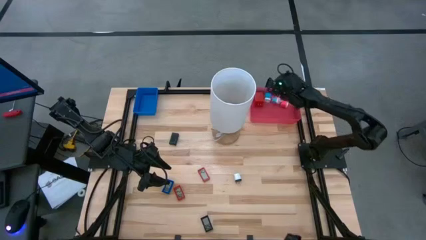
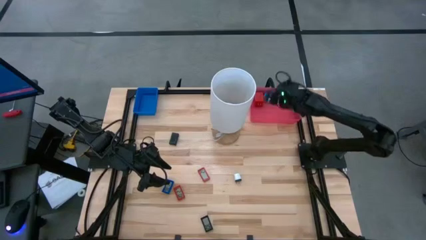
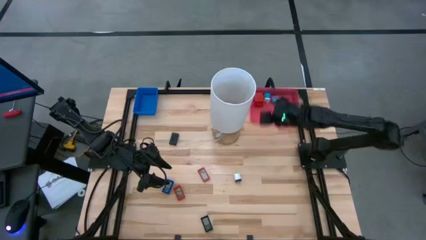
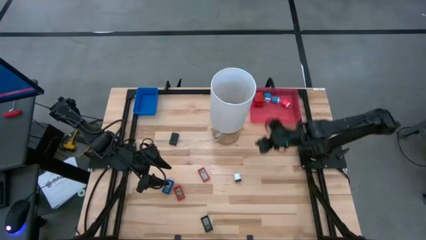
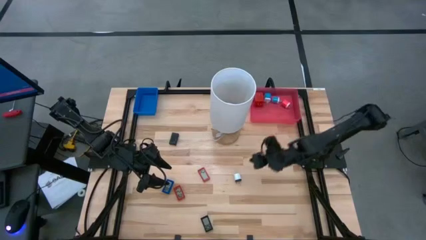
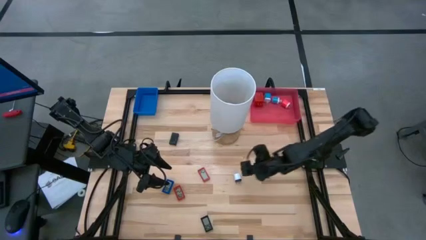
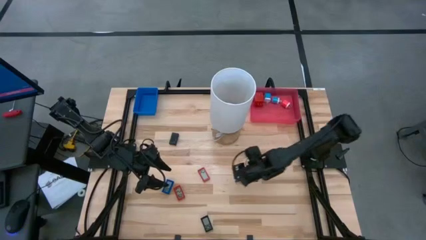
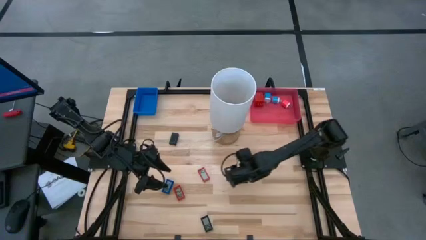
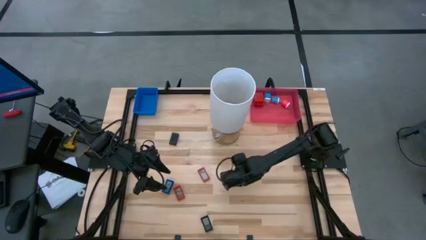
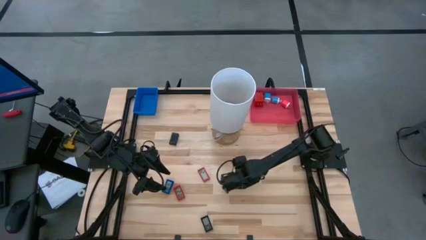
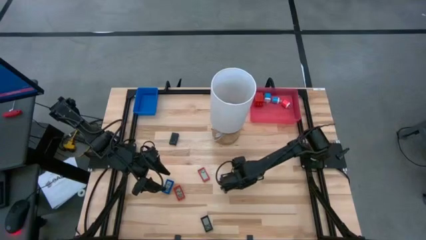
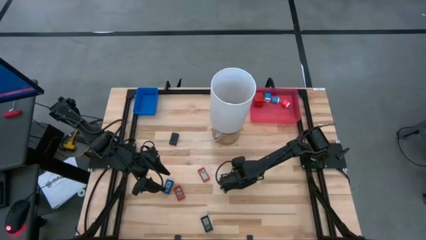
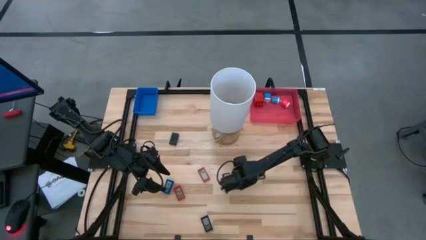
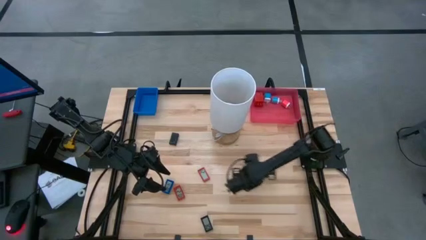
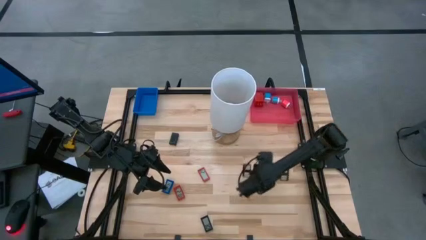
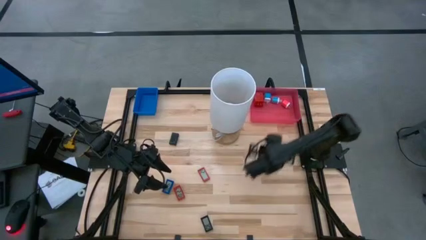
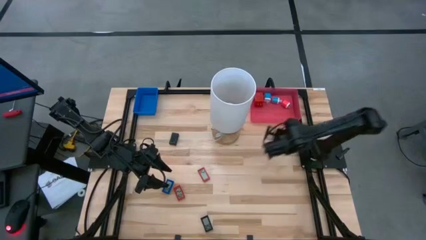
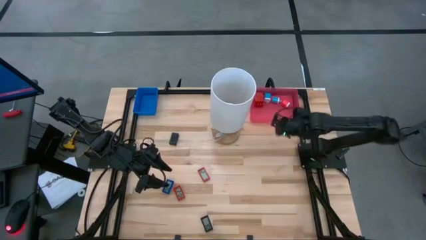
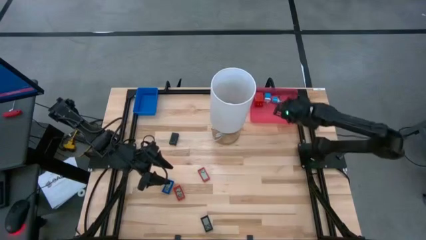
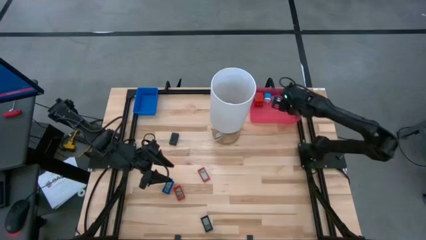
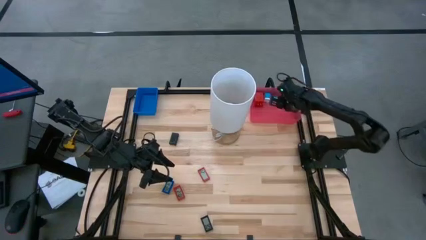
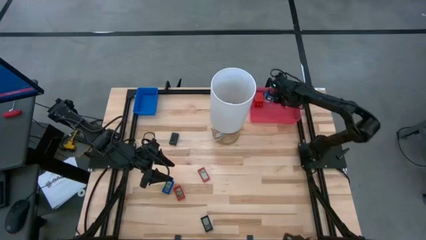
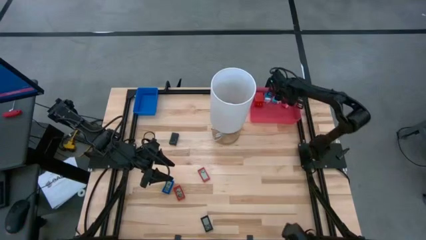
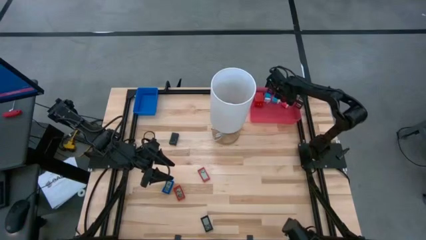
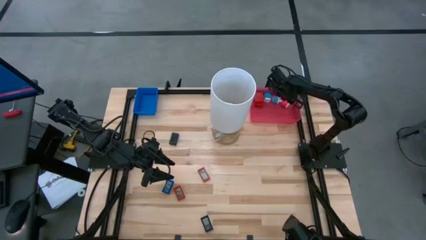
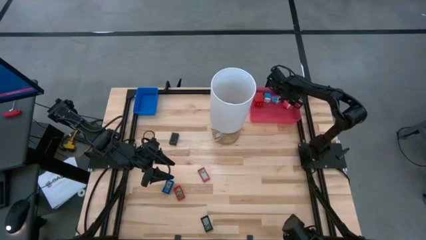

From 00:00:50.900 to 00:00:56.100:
Task: Pick & Place Office items
Put the white charger adapter into the pink bin

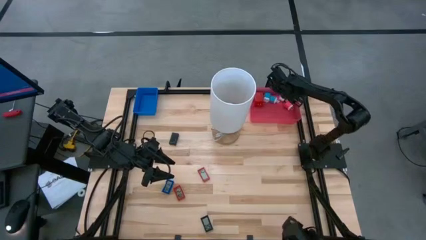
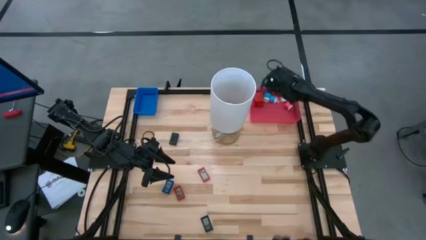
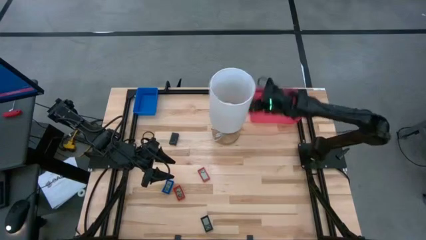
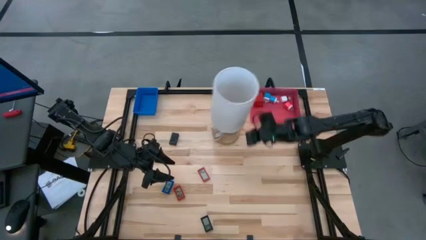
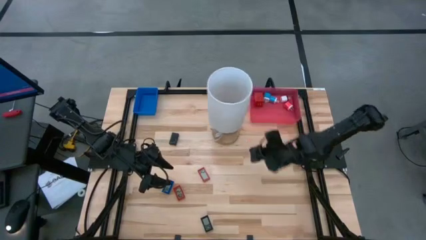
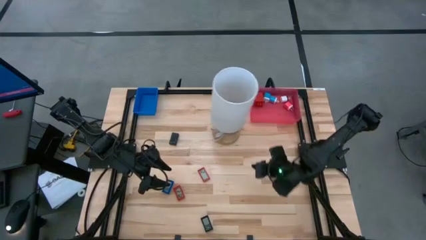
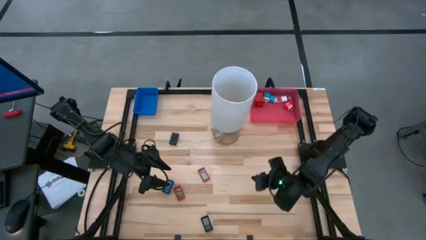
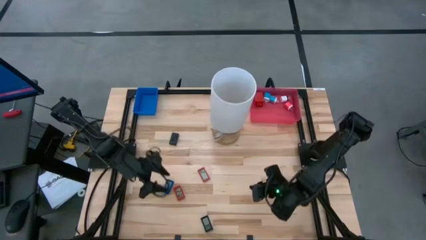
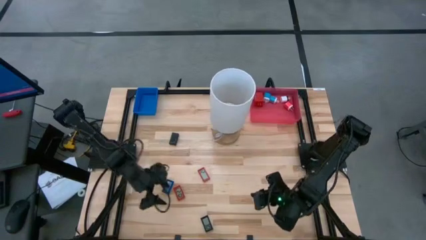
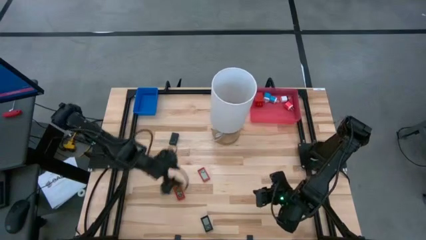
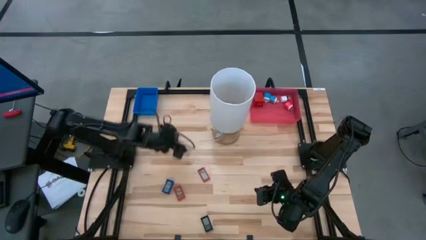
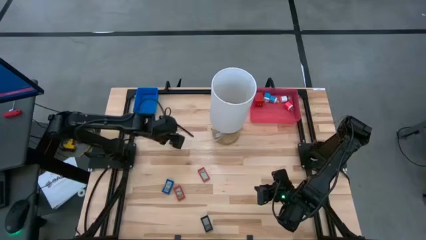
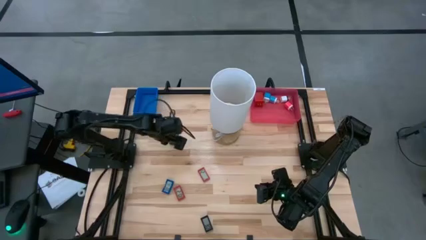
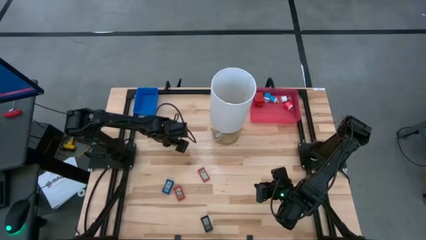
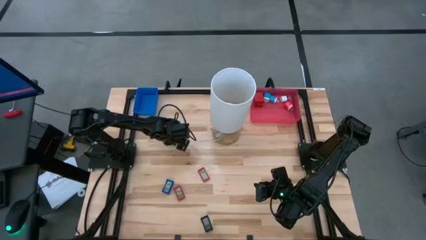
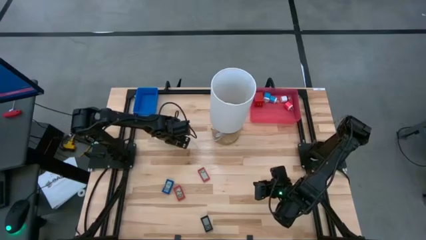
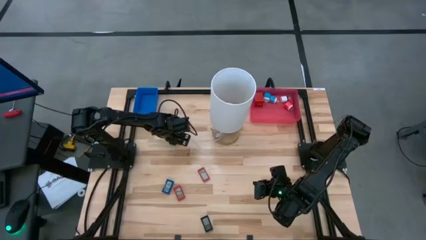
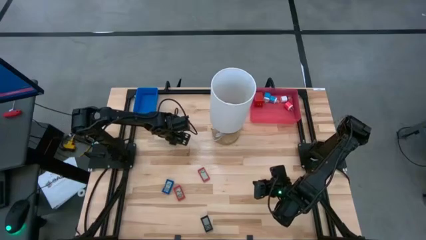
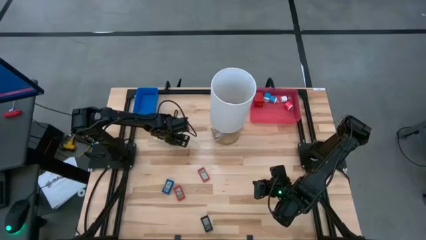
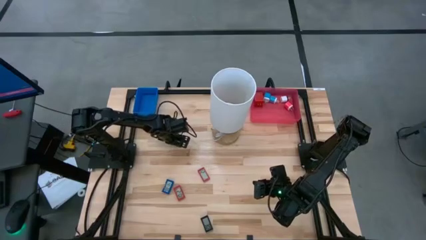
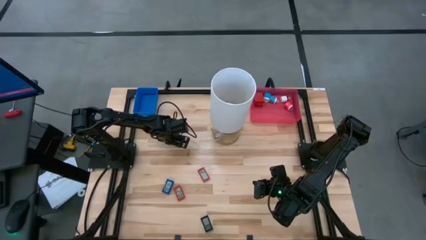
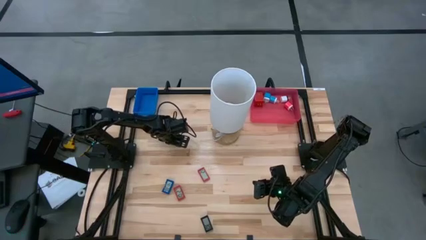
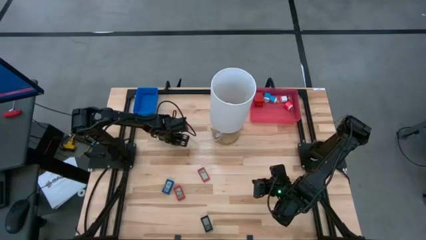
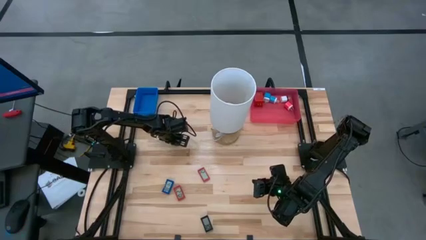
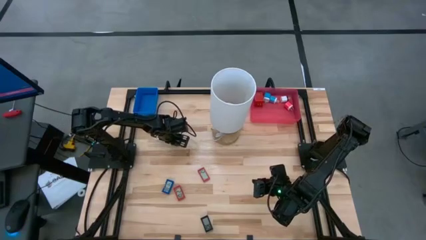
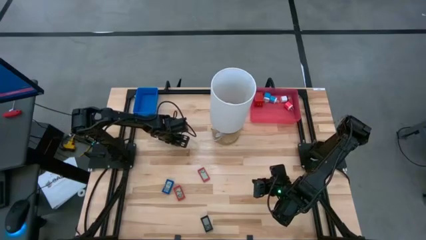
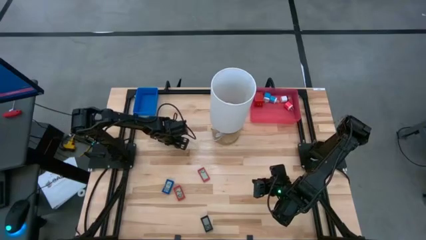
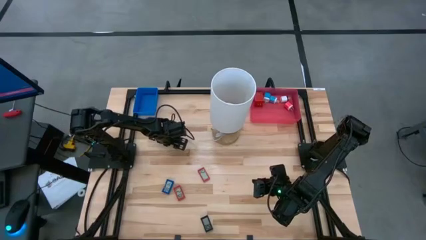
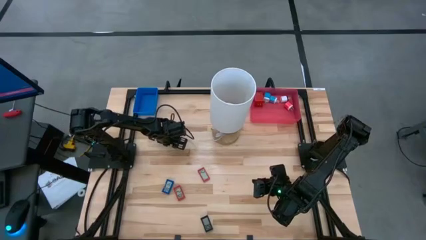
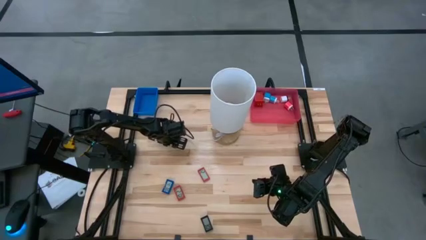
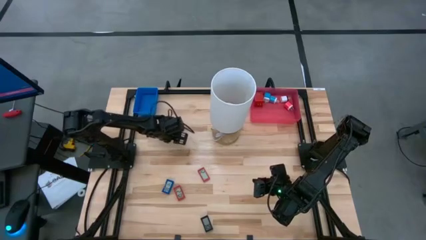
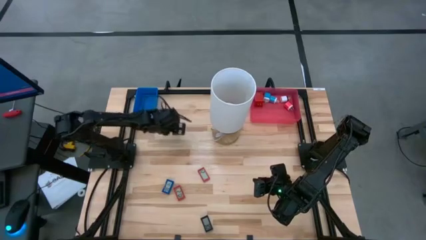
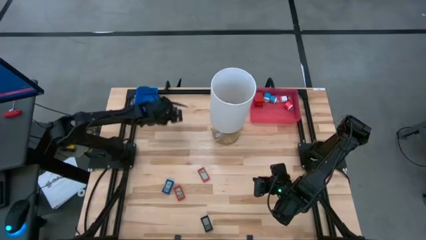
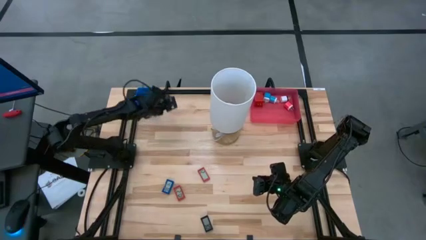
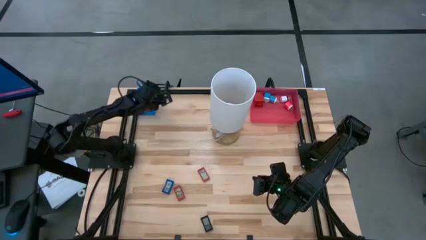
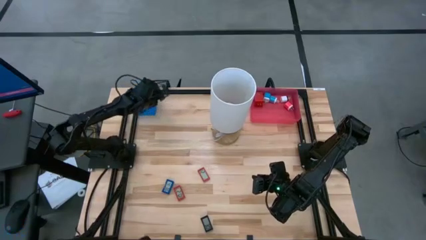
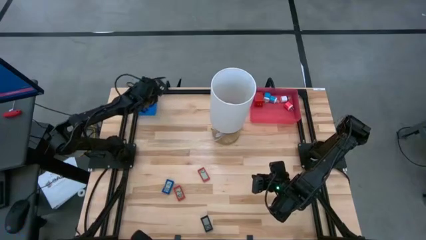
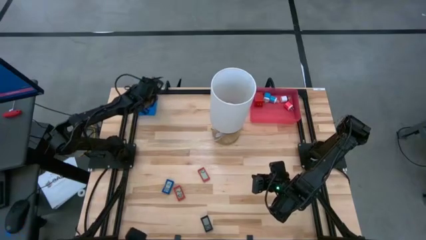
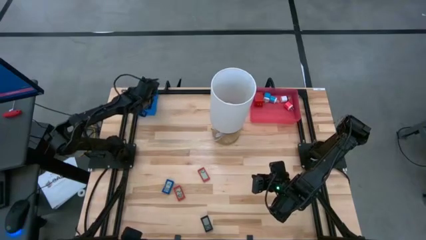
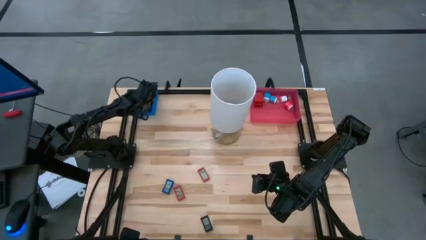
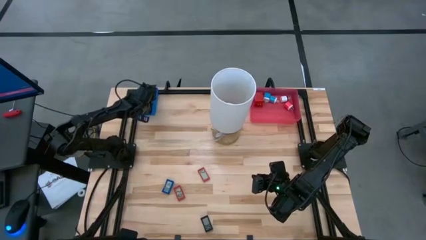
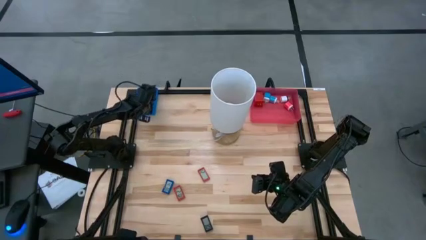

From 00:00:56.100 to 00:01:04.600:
Put the top black digital timer into the blue bin

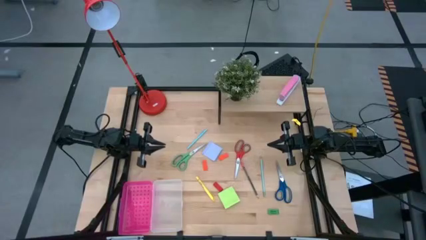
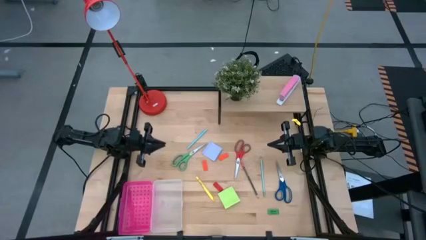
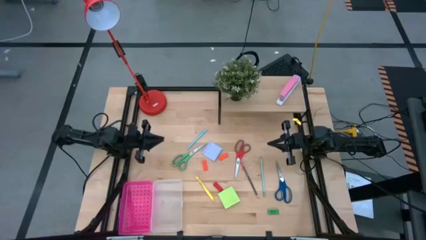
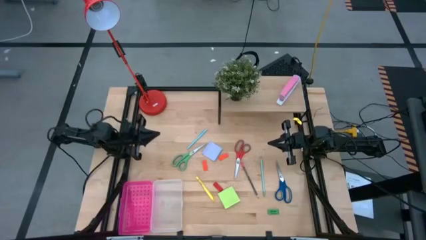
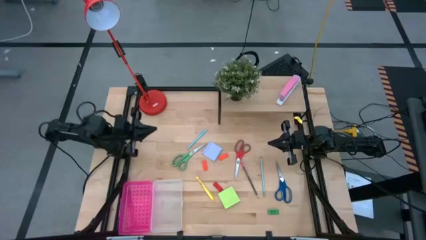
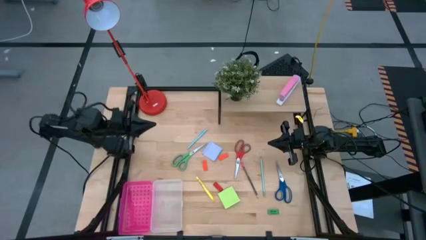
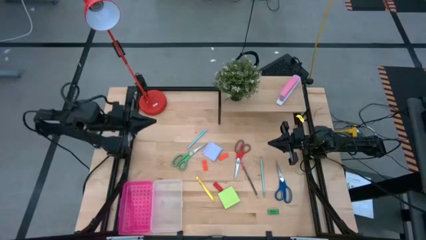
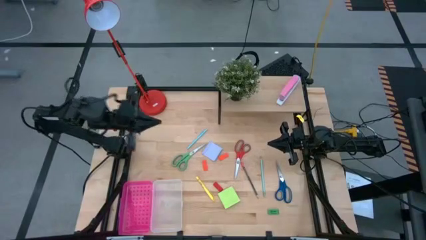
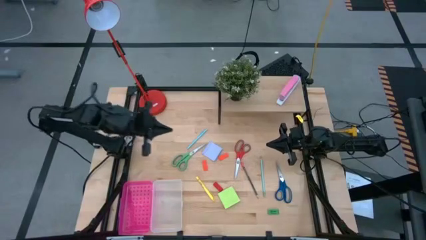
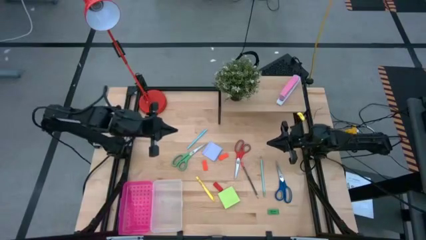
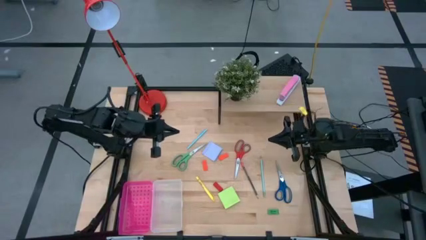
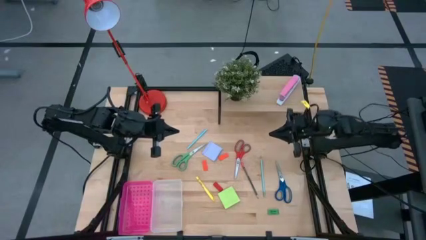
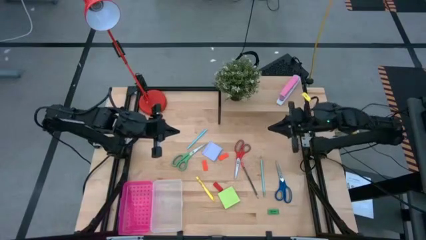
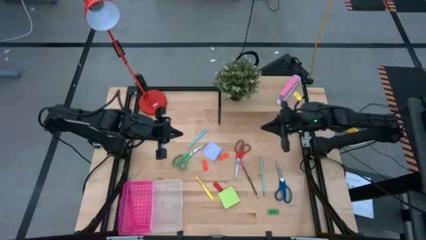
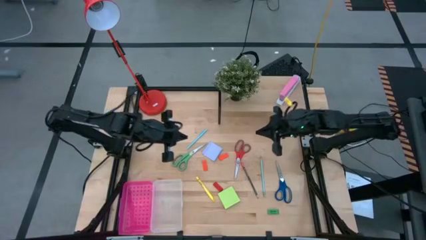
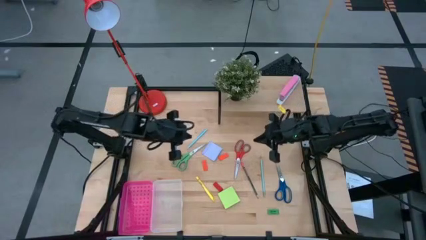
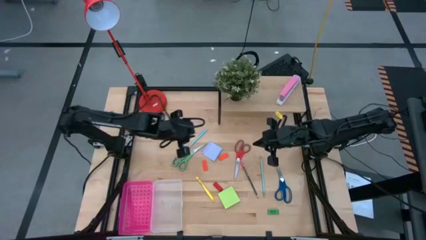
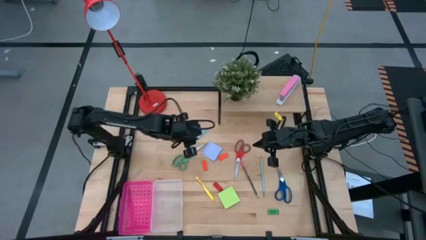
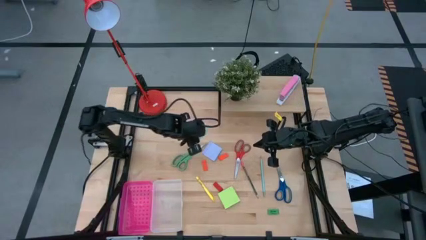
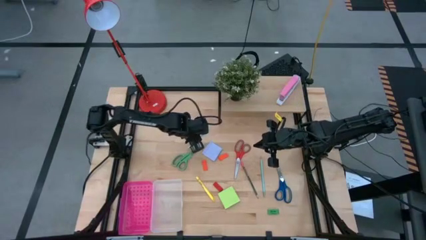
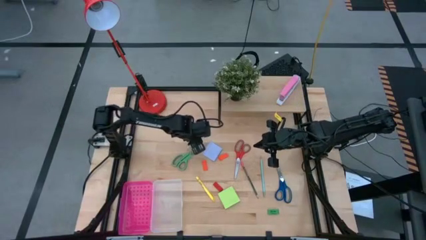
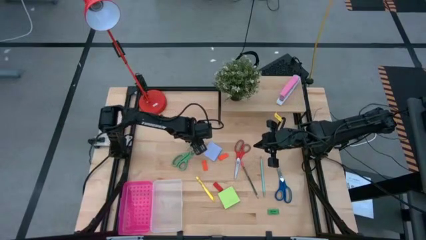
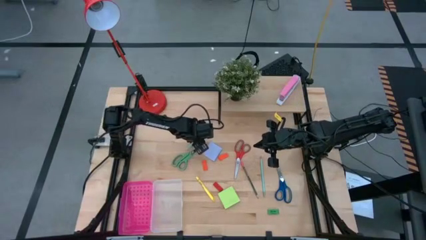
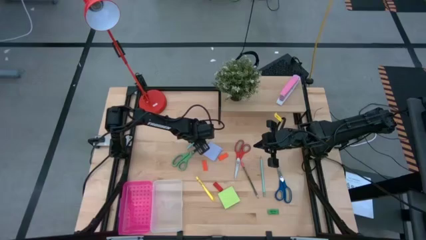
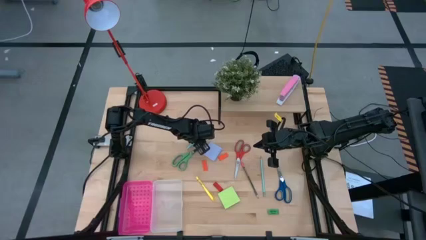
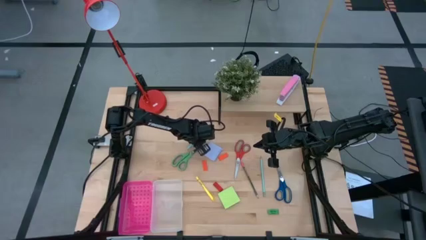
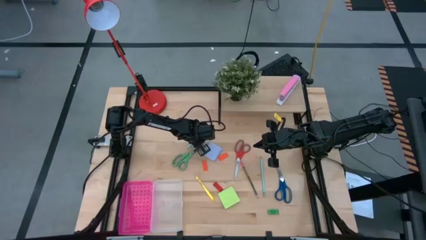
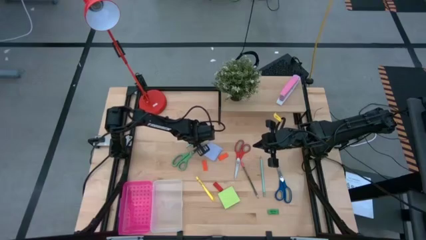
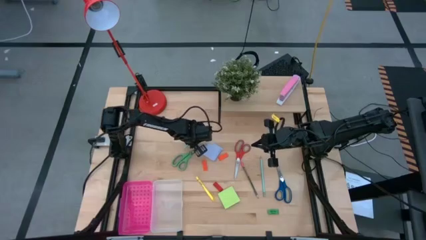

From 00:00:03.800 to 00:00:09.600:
Task: Pack school essentials
Put the blue pen into the pink supply box
